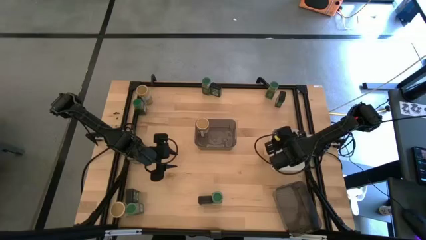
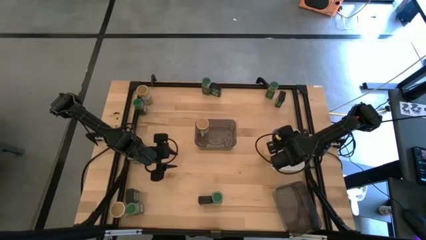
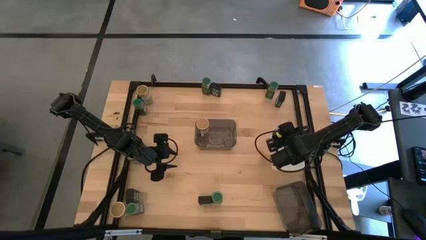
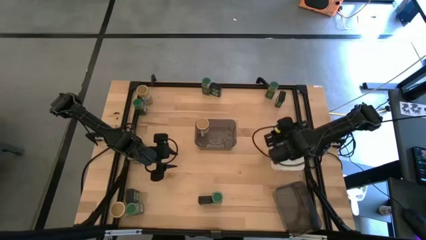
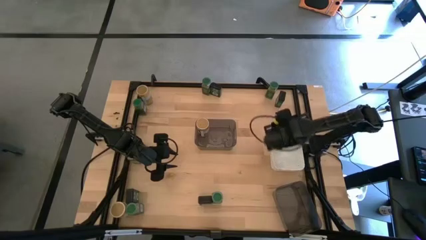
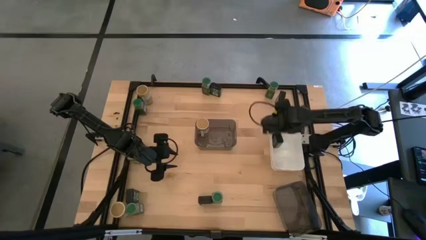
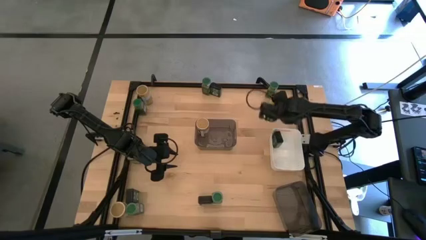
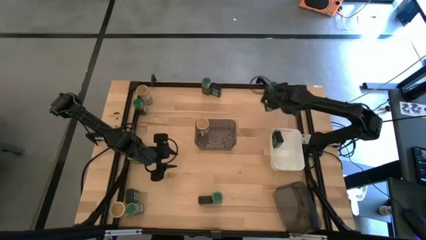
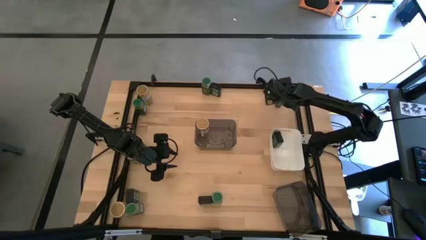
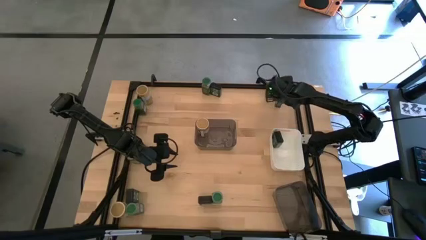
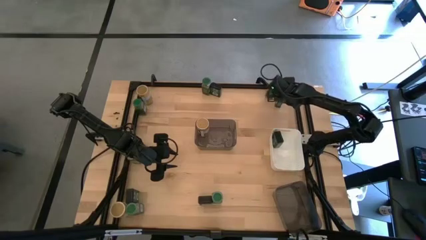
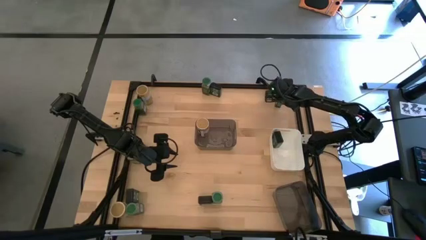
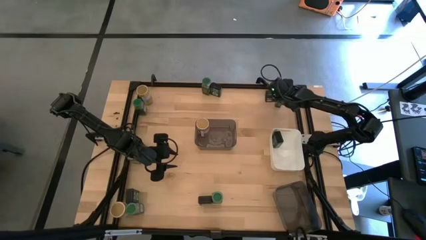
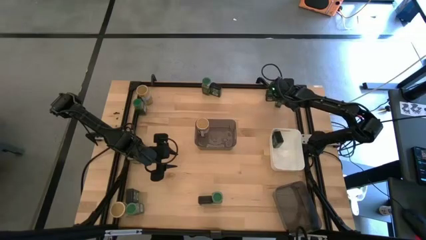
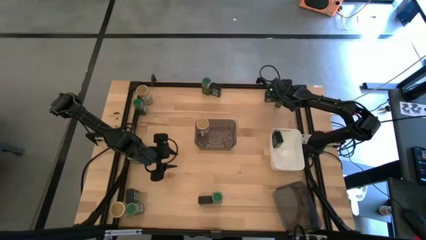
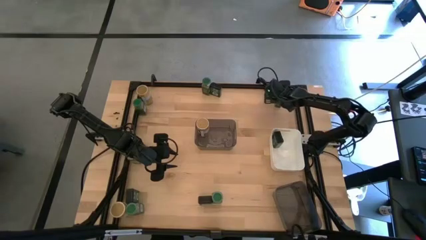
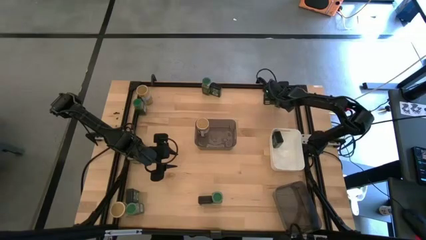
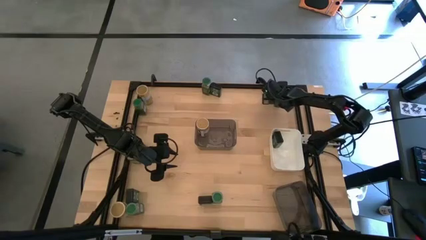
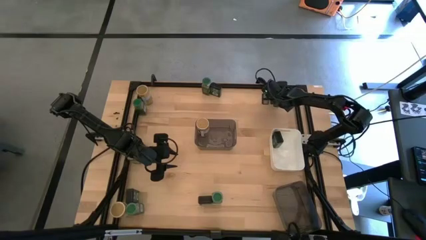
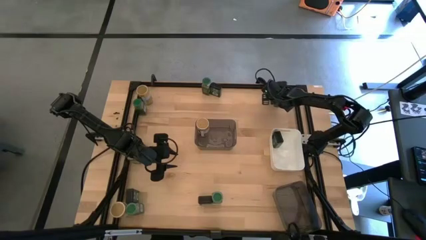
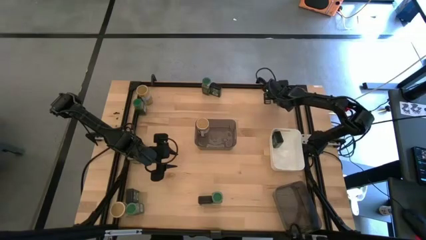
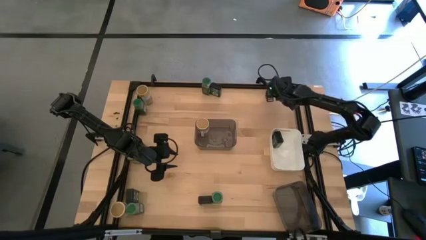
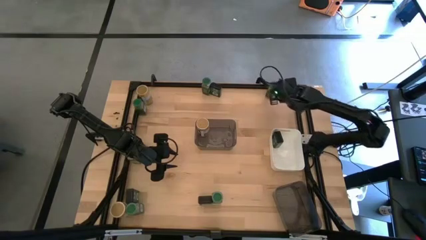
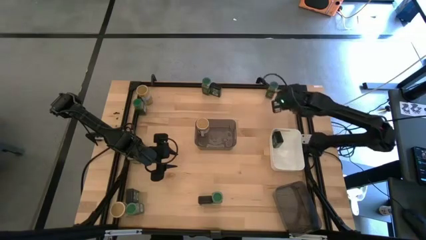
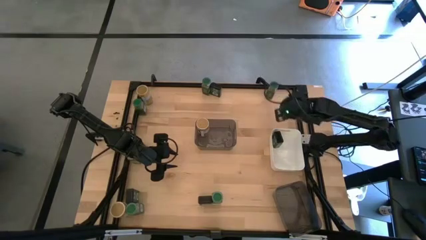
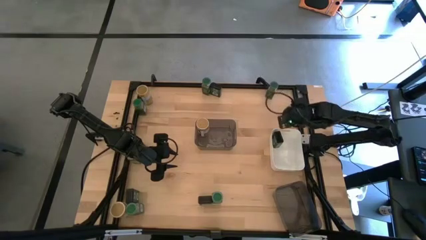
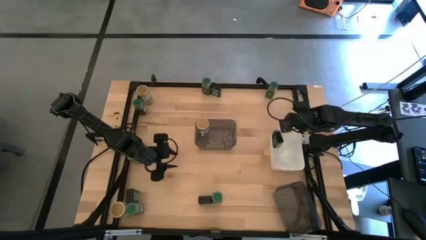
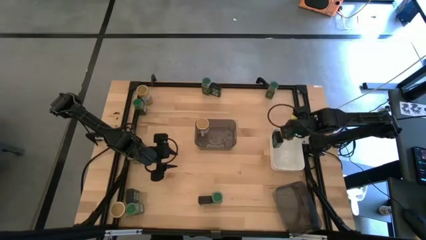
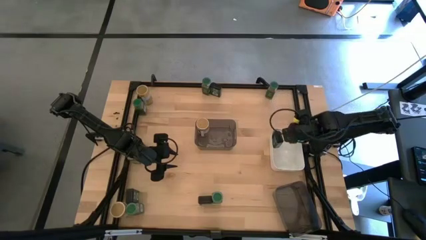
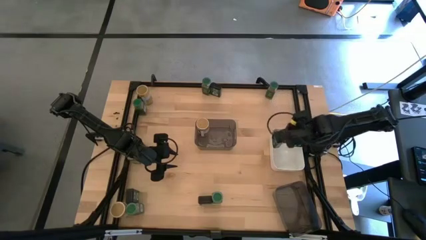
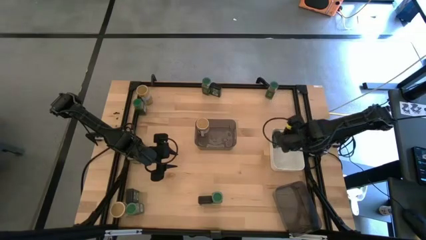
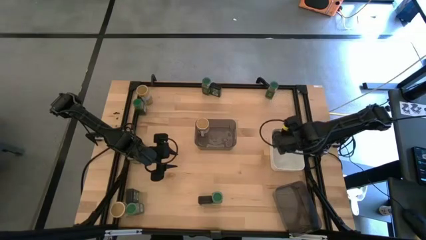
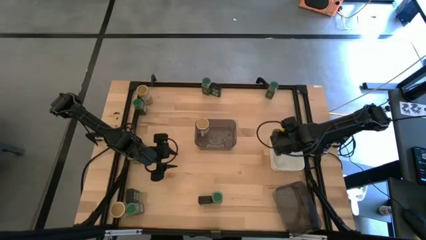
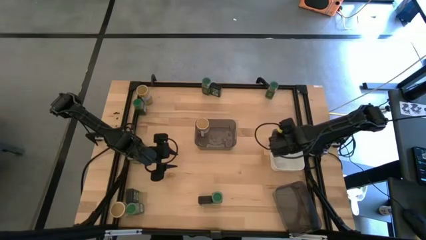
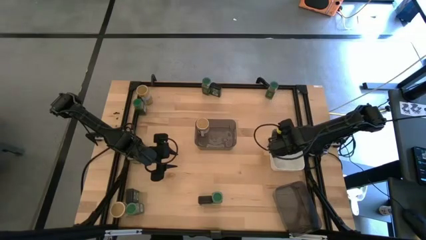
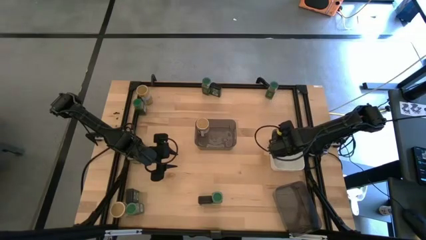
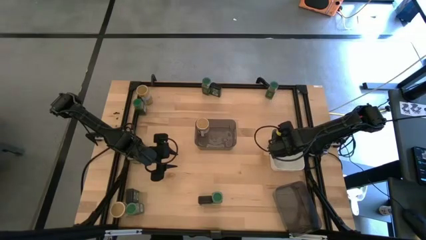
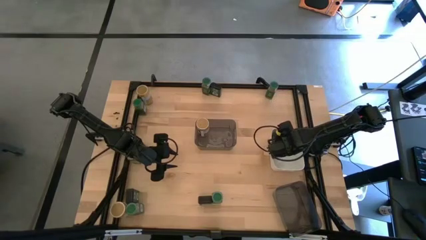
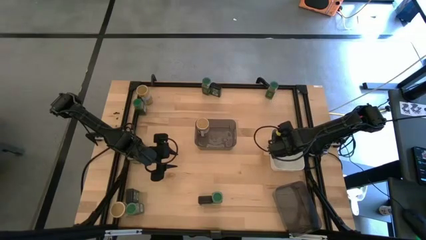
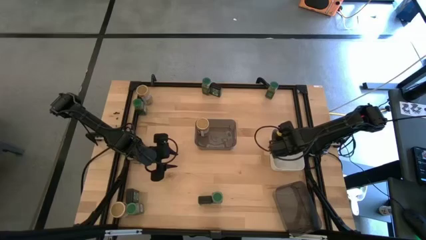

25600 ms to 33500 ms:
Task: Sort spices by type
Put the top right black seasoning can into the white bin

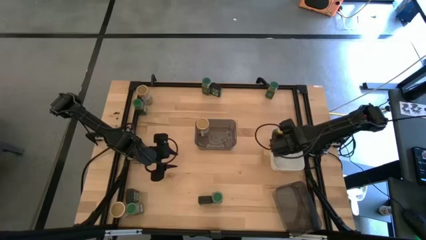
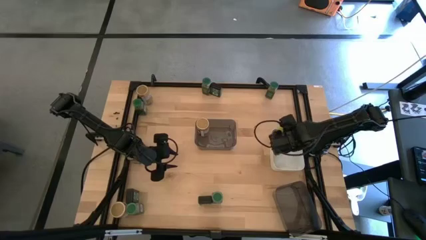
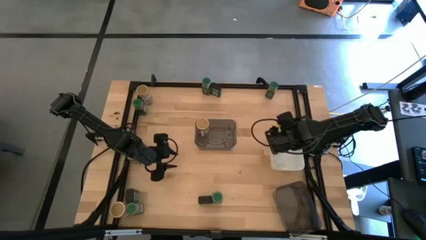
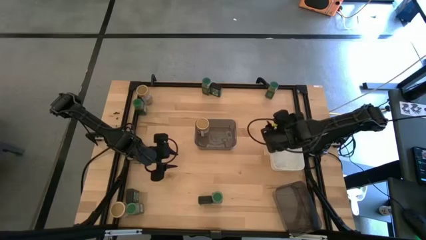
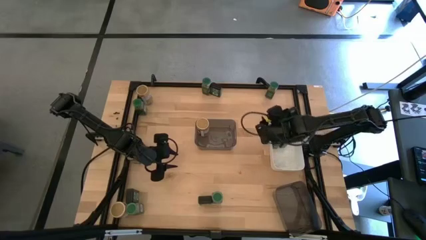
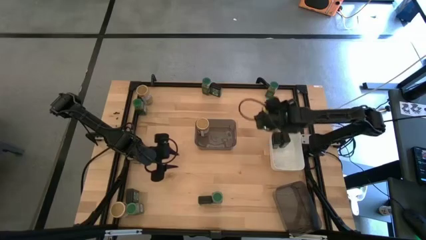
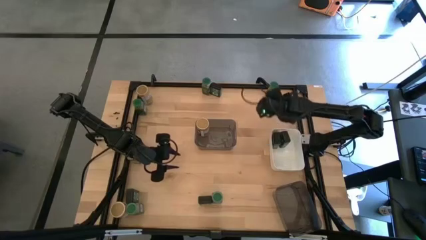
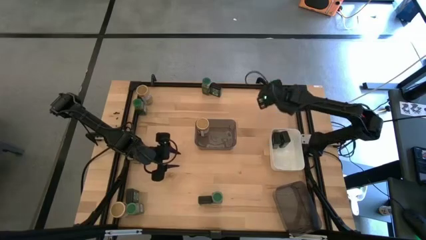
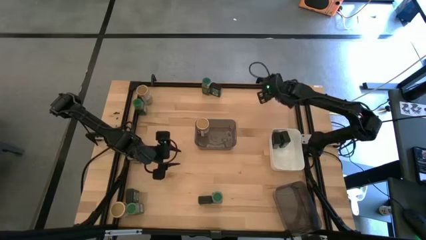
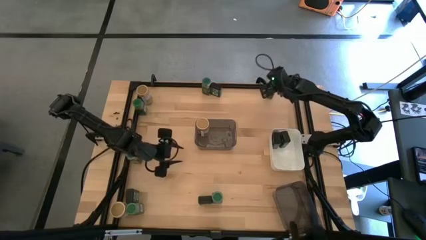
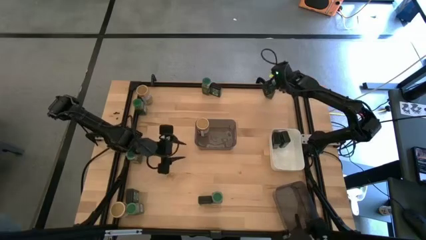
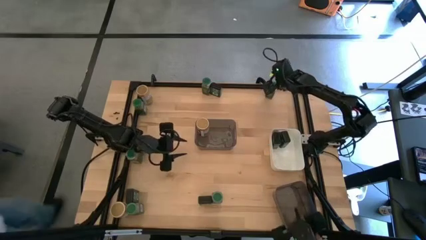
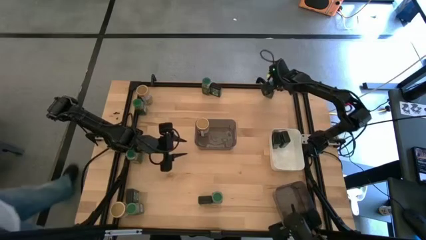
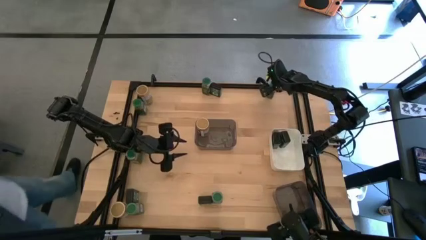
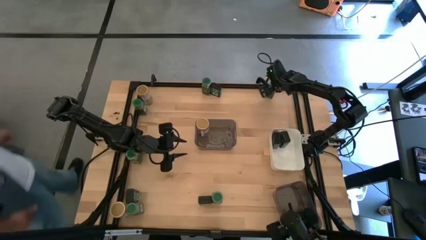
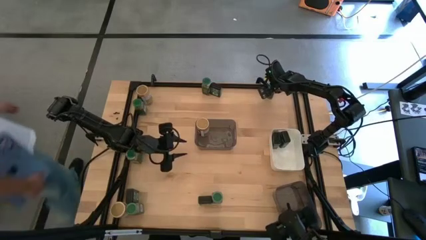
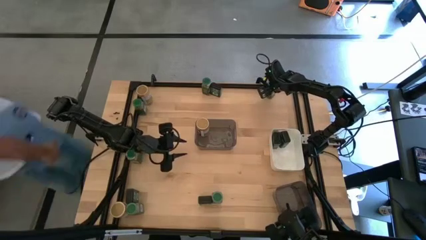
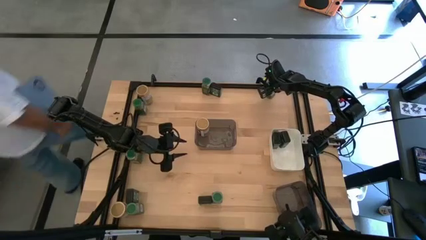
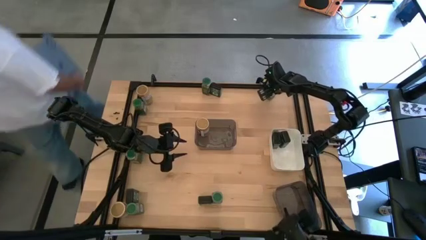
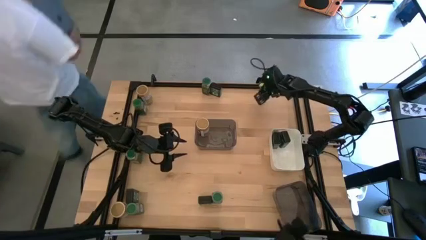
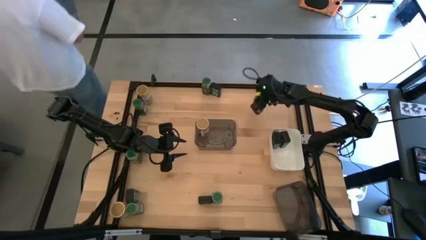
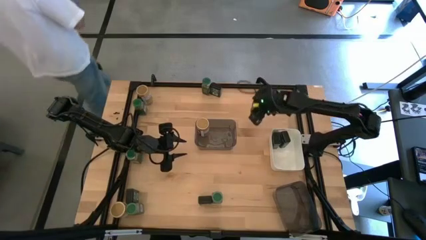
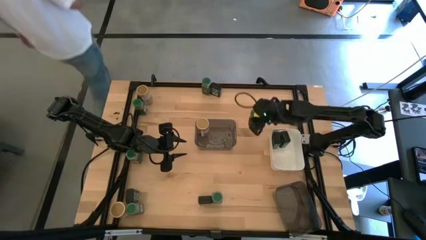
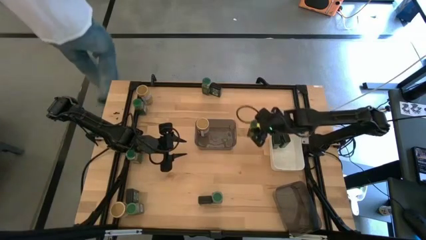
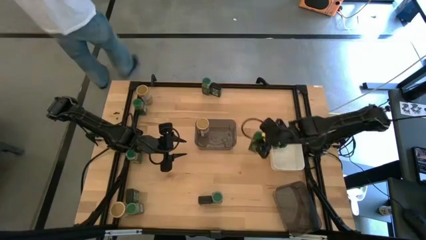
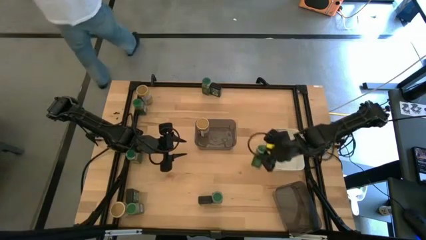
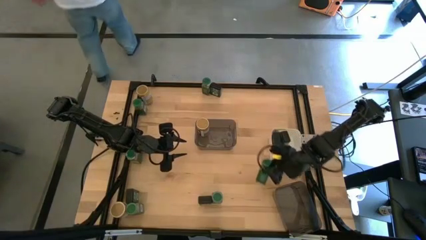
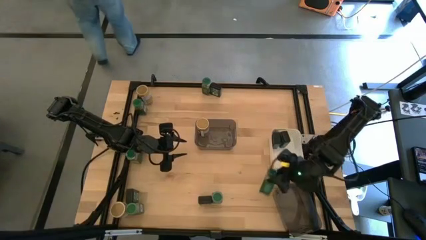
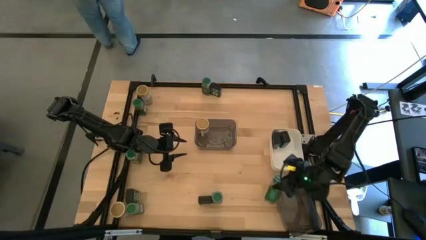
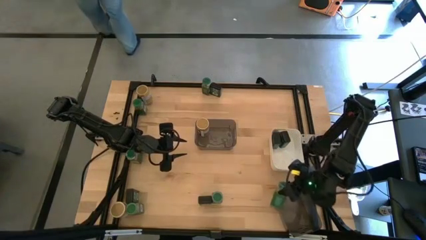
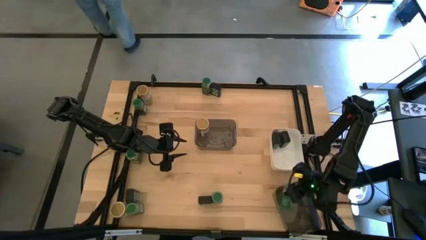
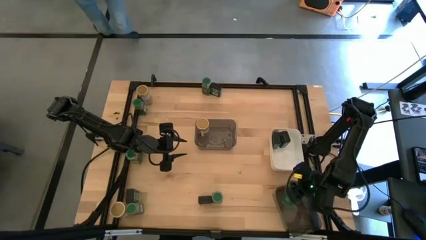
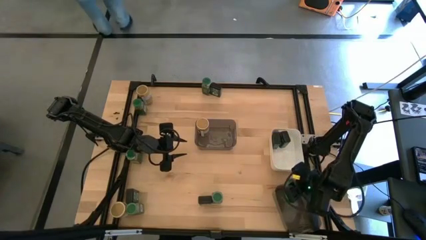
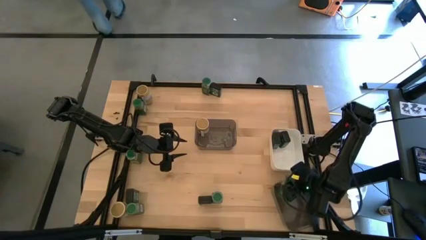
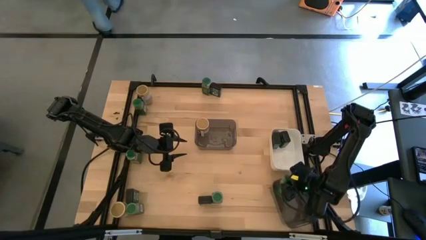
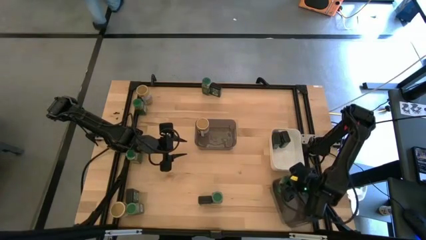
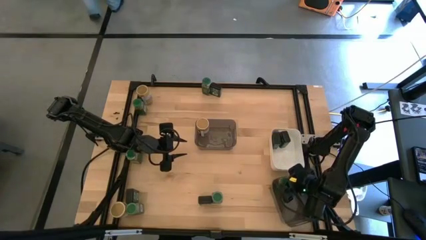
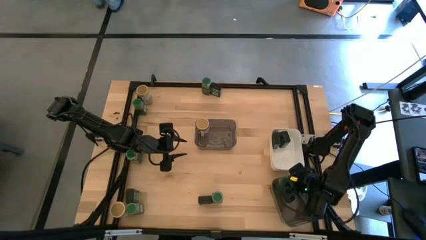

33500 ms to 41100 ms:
Put the top right green seasoning bottle into the bottom black bin
